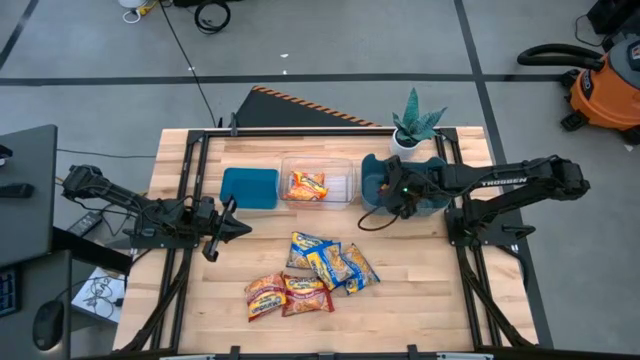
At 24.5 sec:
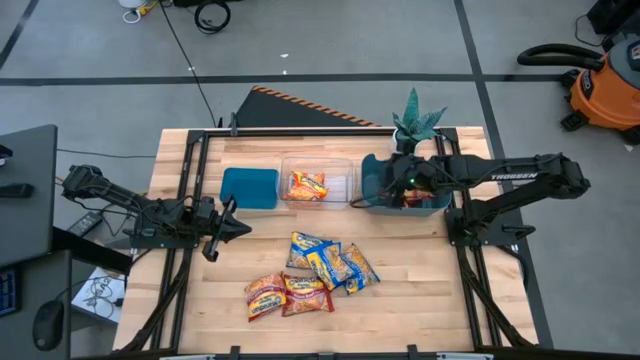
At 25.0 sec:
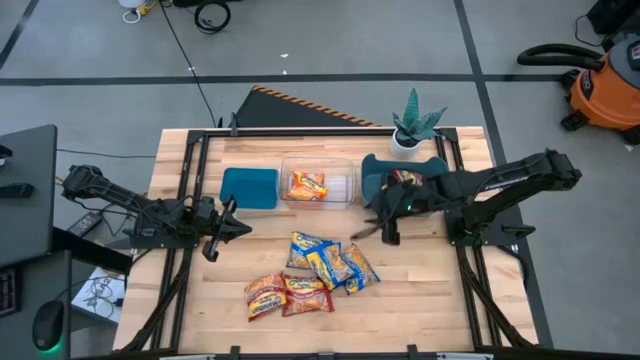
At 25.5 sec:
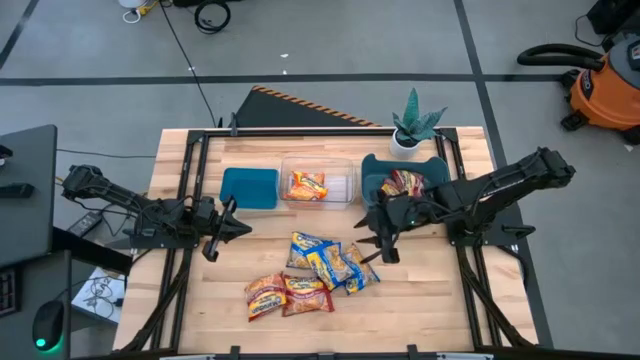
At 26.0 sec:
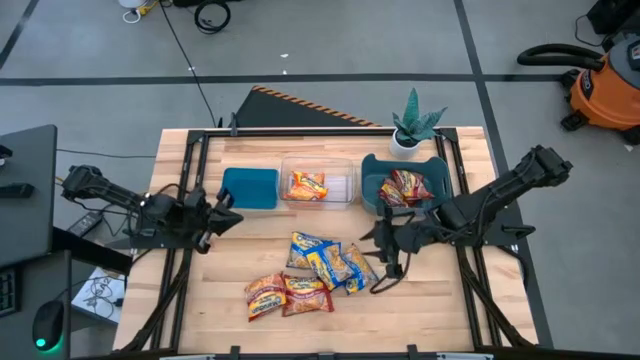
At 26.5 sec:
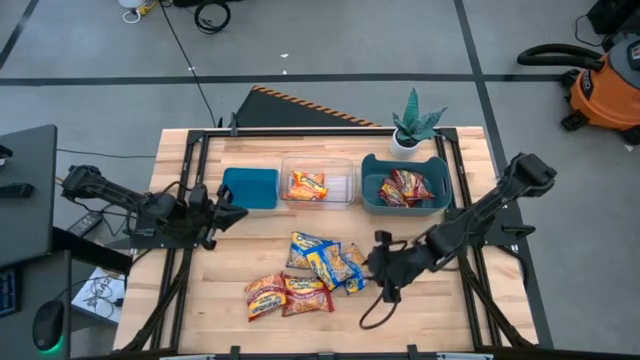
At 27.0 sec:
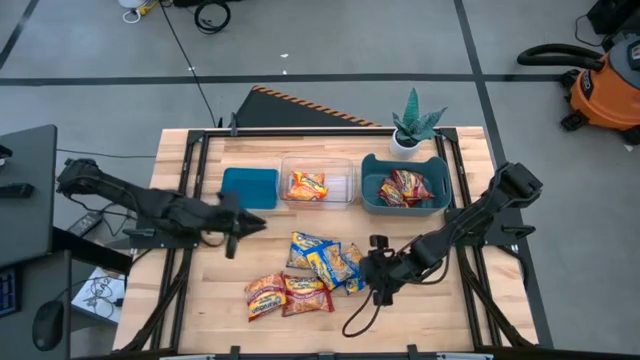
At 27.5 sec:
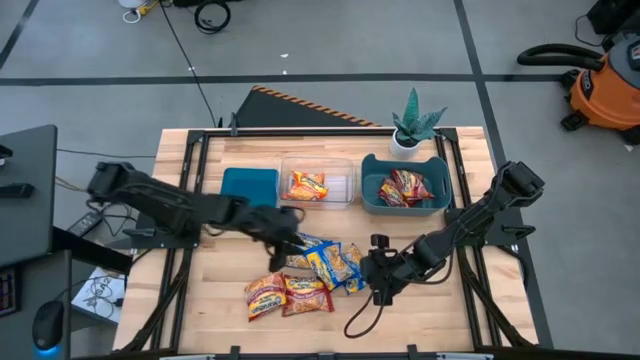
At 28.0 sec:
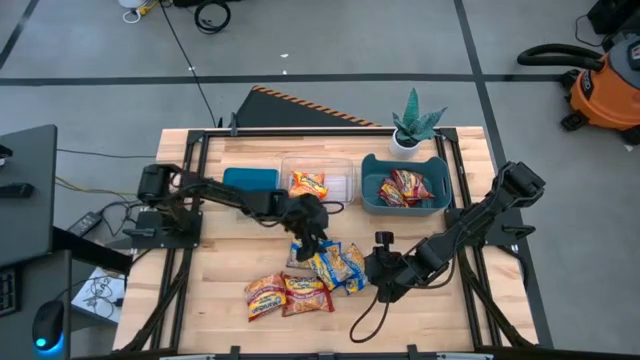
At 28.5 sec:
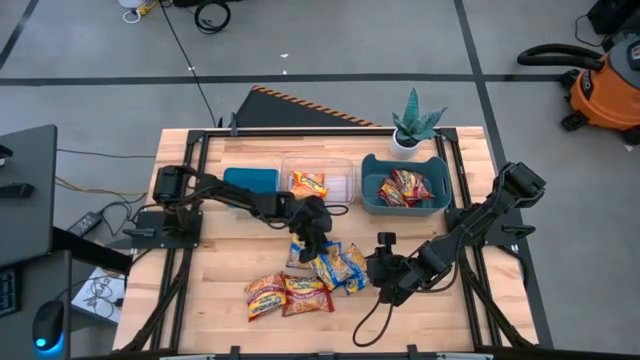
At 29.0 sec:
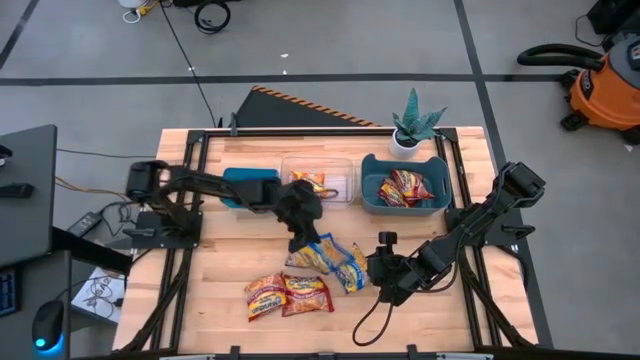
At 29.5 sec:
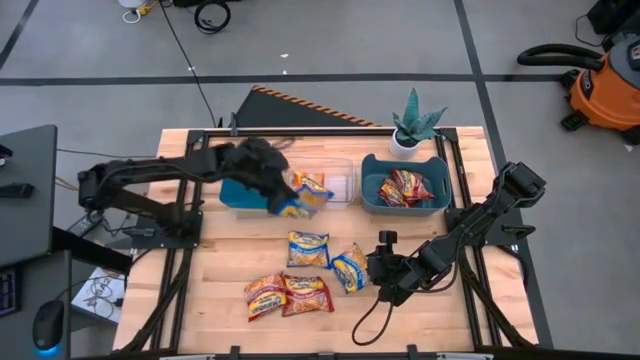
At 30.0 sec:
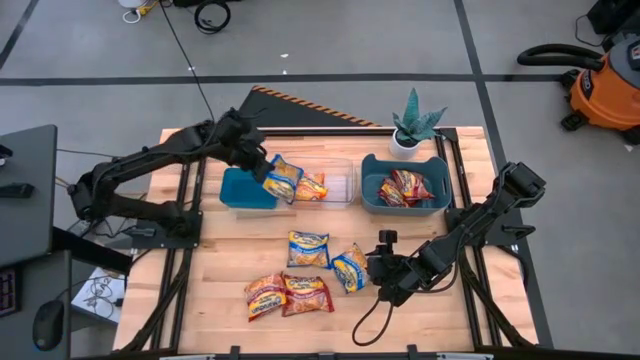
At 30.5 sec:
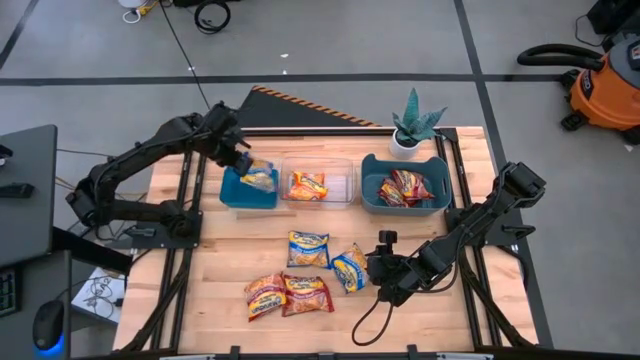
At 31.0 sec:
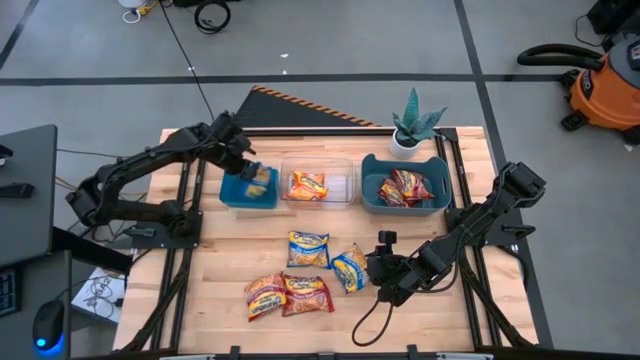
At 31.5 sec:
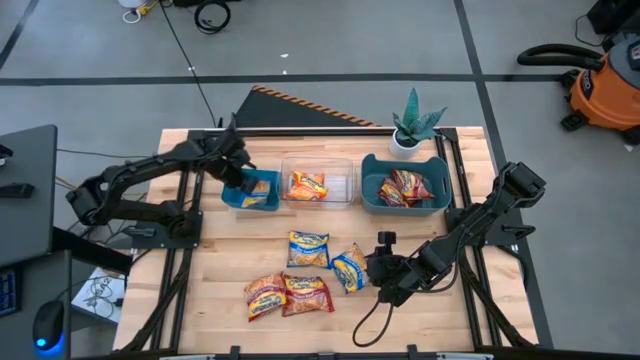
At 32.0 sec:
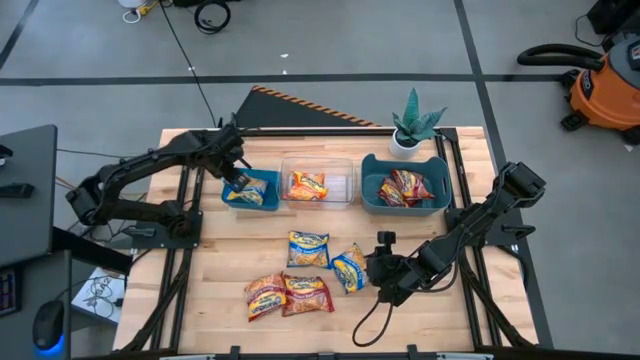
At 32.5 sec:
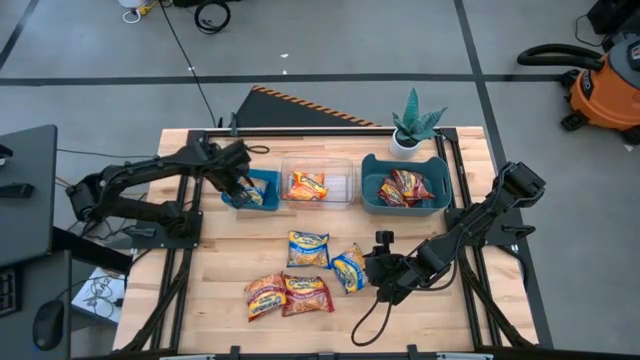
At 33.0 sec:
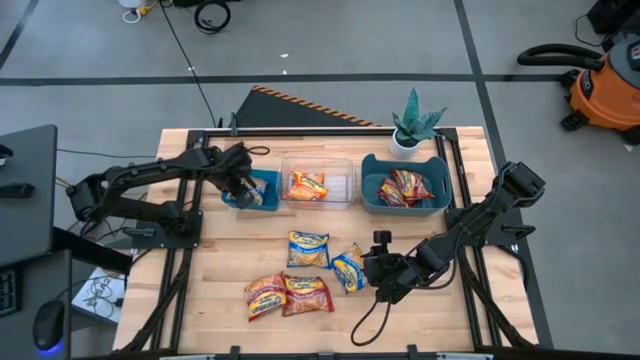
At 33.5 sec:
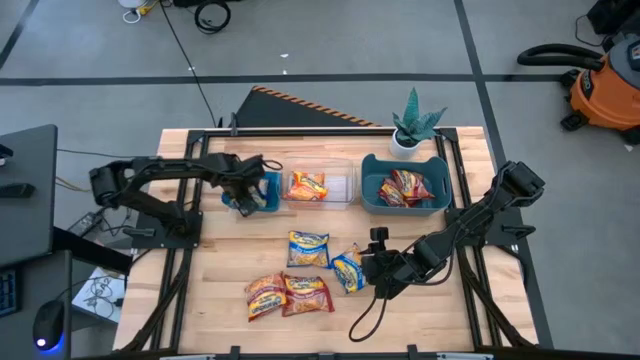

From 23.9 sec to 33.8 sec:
Task: Sort Maruchan noodles
Put the blue noodle pack into the blue bin

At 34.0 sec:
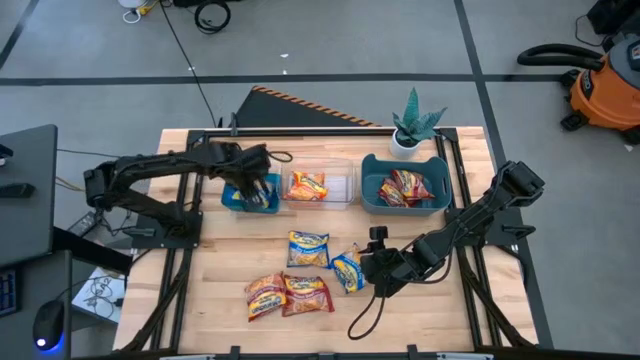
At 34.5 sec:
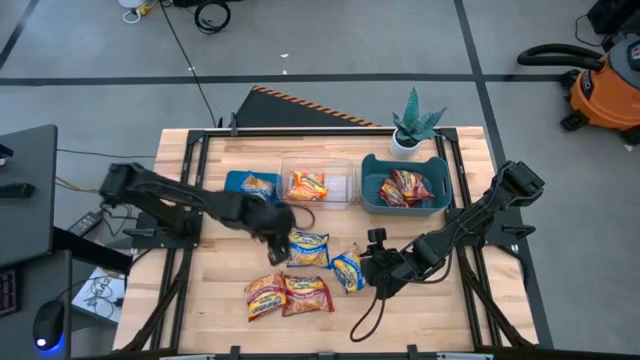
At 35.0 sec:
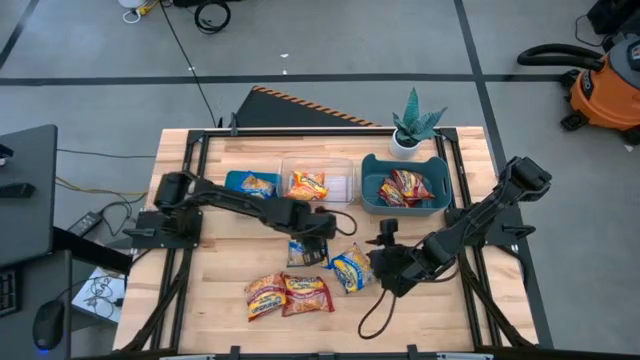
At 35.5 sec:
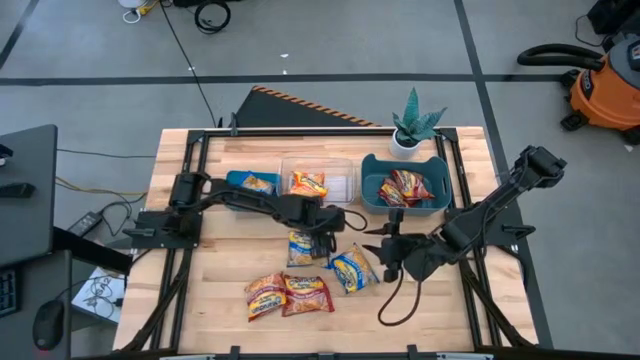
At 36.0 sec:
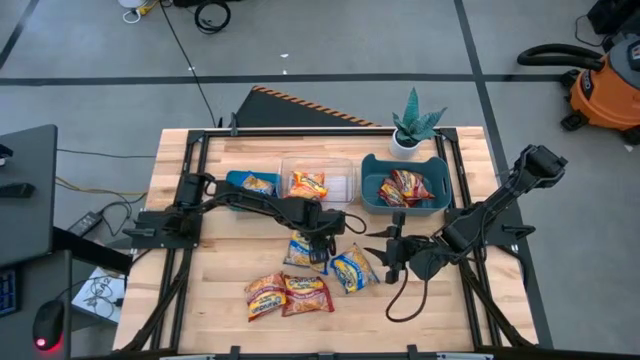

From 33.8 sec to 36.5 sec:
Put the blue noodle pack into the blue bin

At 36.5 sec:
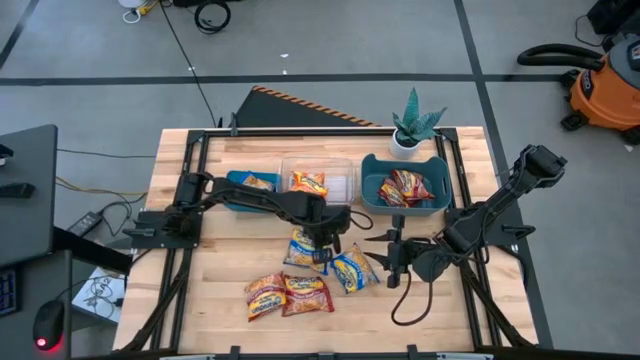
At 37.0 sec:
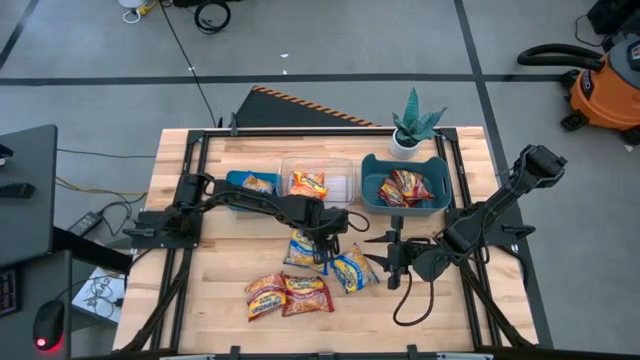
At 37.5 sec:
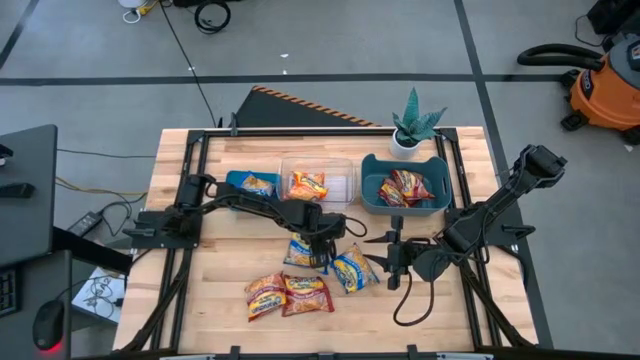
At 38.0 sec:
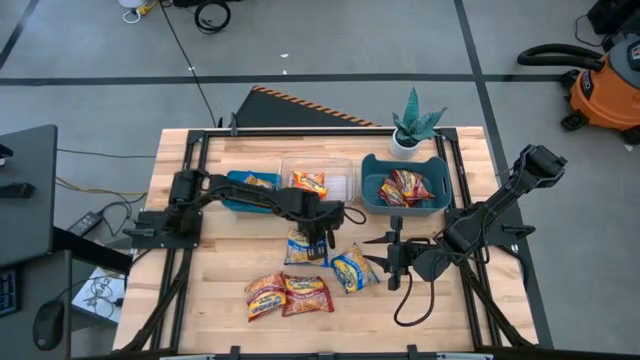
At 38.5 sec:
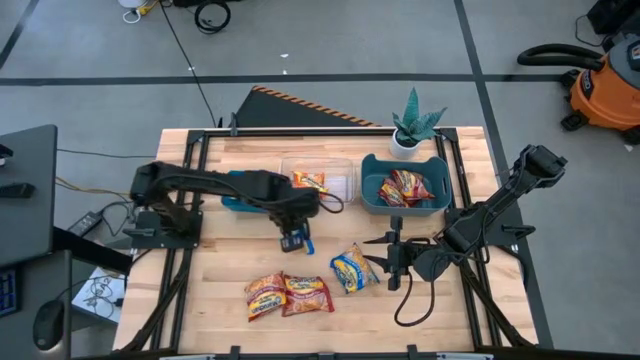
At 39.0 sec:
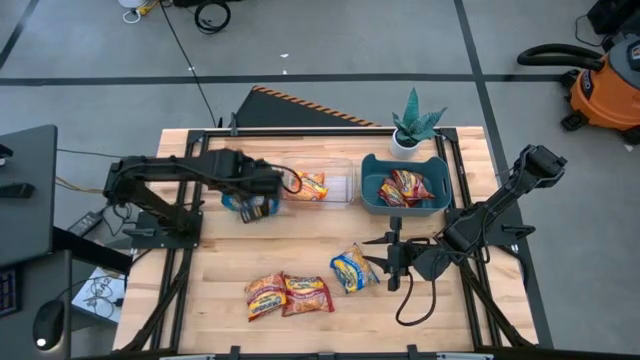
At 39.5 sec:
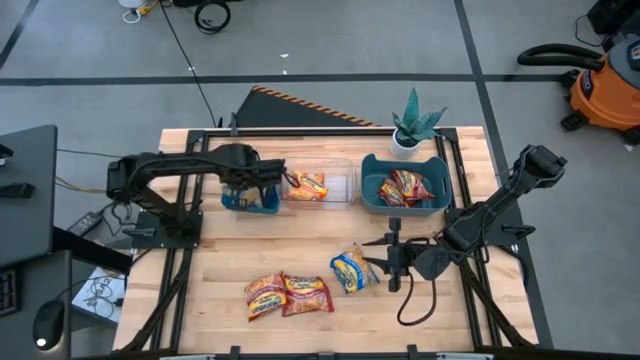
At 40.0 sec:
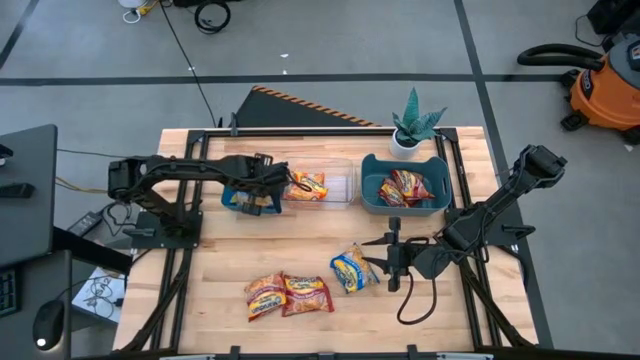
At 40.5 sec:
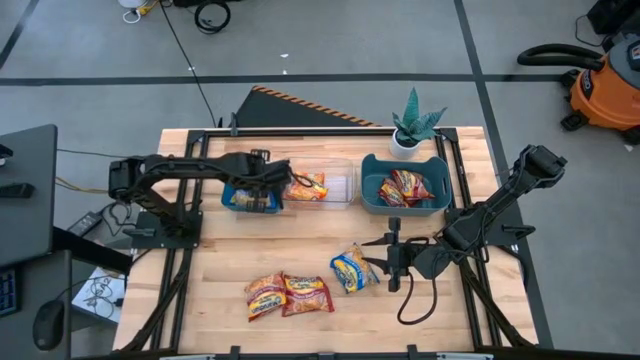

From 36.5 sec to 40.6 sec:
Put the blue noodle pack into the blue bin

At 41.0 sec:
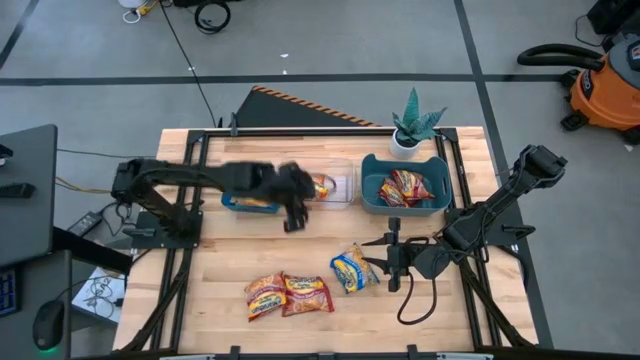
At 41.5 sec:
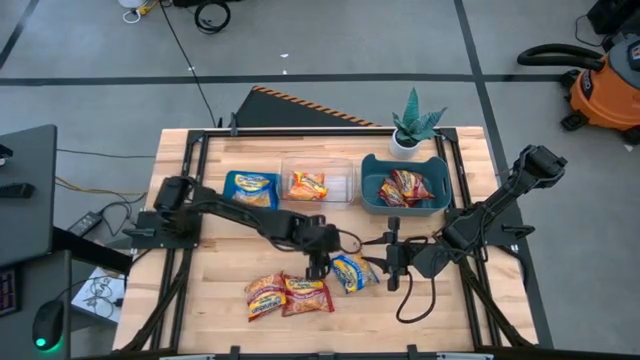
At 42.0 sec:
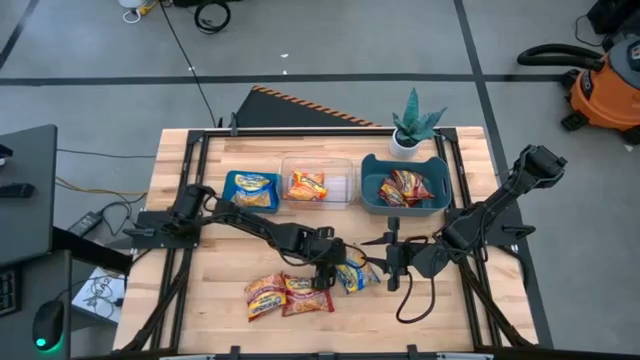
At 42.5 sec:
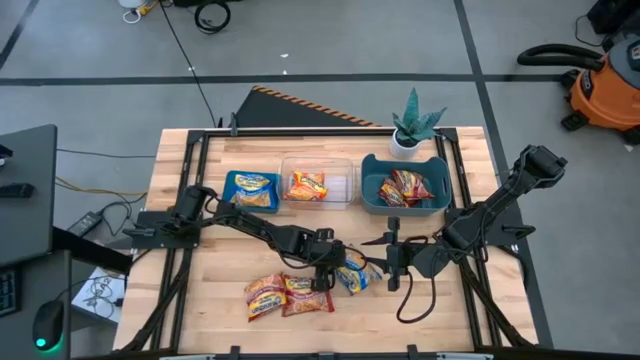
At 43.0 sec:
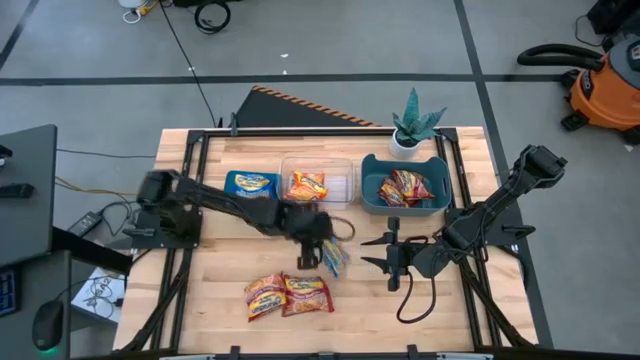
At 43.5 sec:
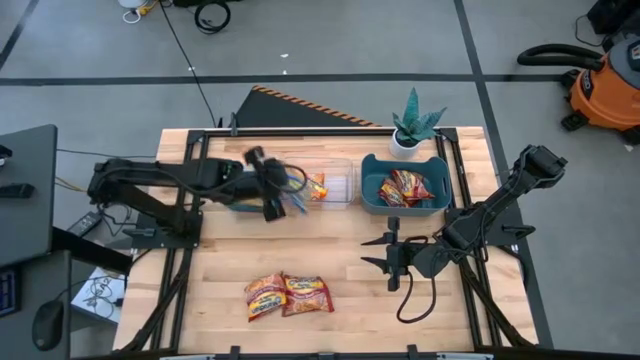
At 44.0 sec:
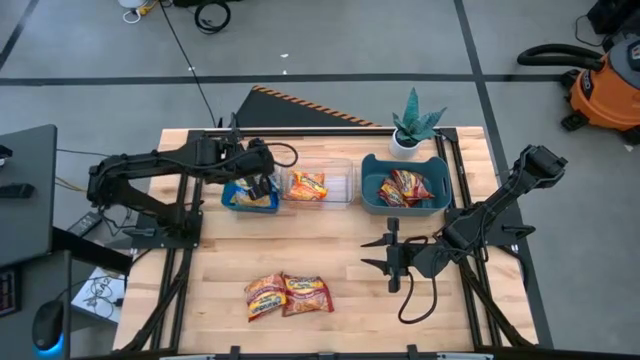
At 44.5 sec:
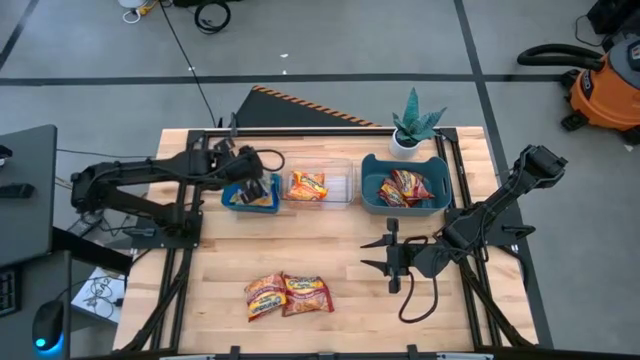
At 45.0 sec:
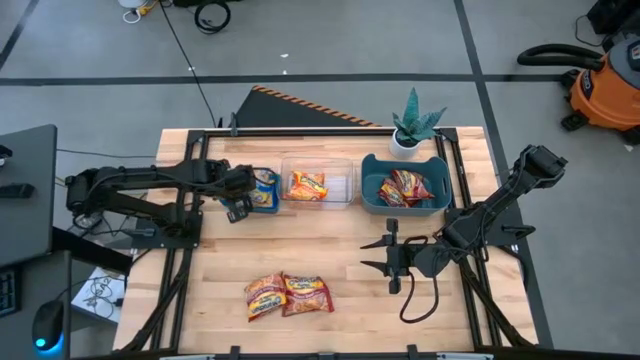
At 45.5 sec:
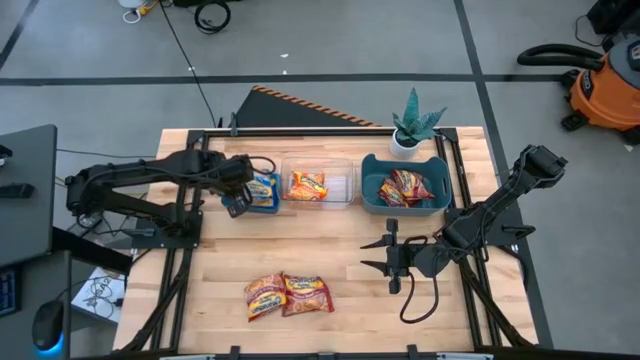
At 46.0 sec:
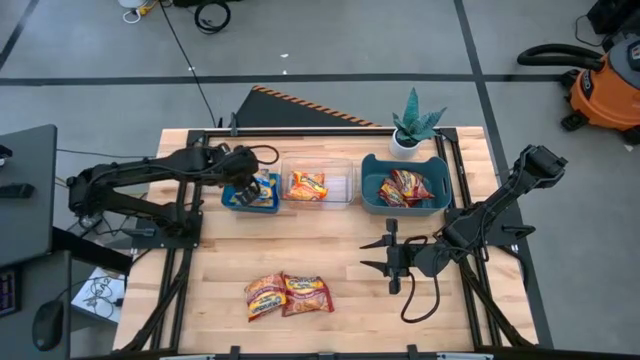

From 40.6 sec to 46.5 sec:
Put the blue noodle pack into the blue bin
